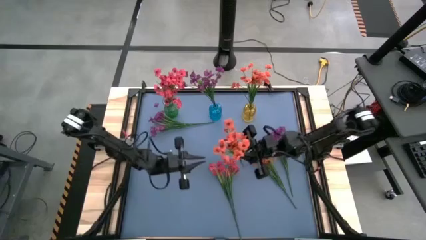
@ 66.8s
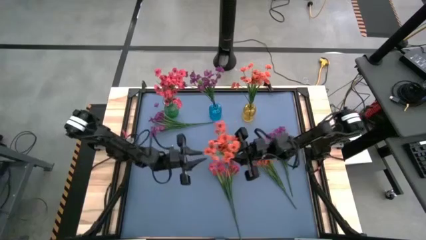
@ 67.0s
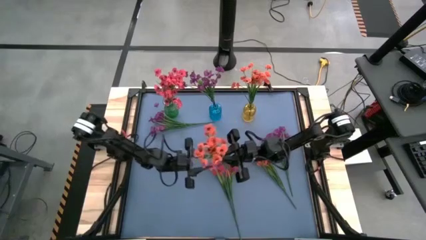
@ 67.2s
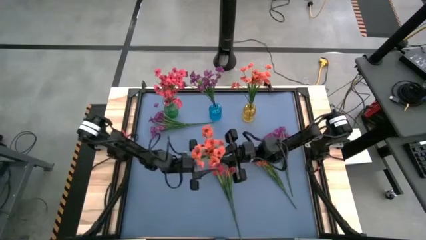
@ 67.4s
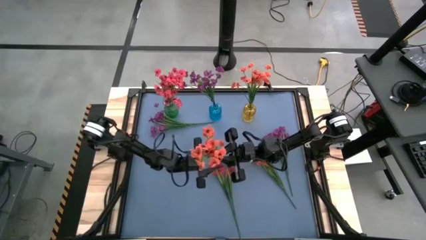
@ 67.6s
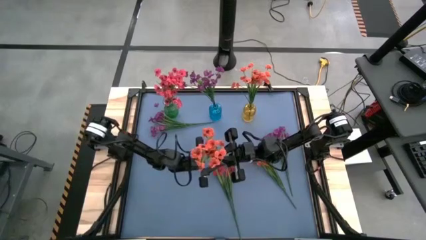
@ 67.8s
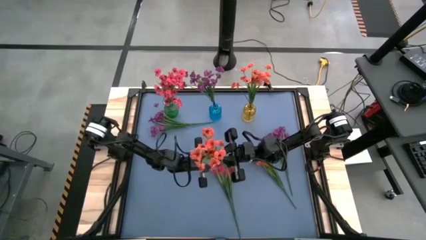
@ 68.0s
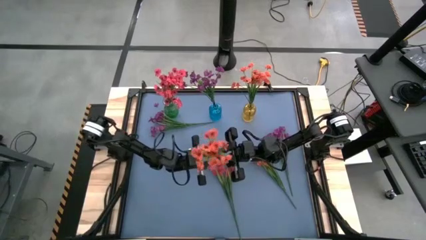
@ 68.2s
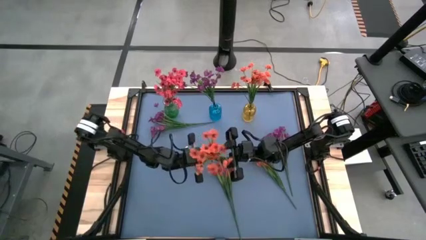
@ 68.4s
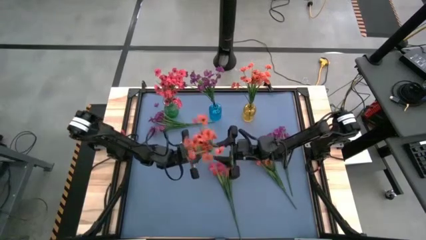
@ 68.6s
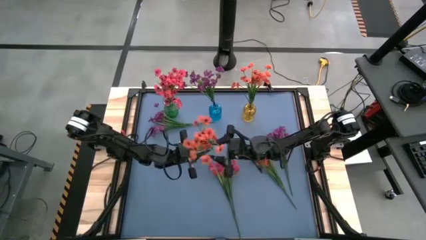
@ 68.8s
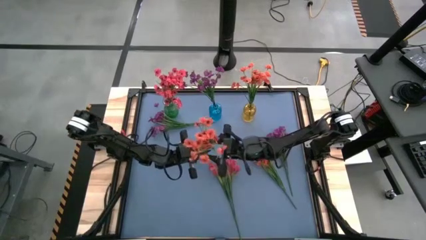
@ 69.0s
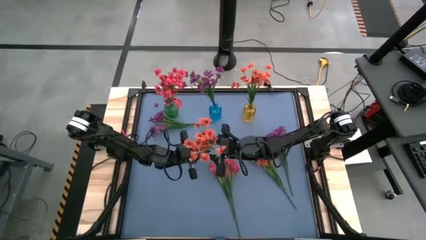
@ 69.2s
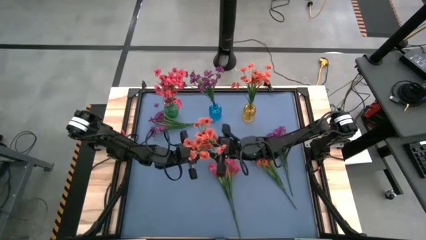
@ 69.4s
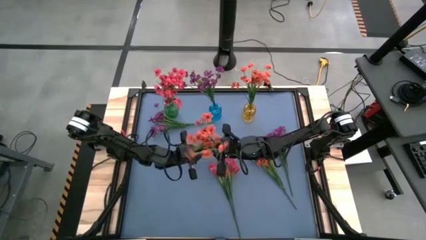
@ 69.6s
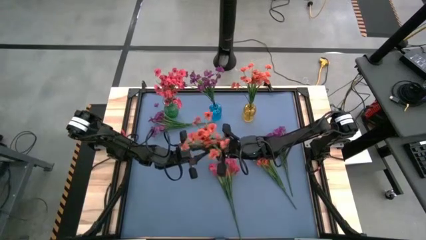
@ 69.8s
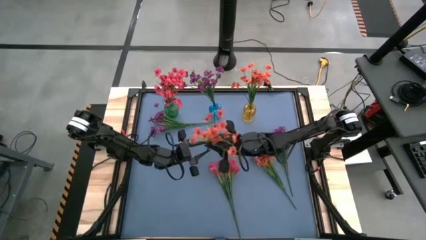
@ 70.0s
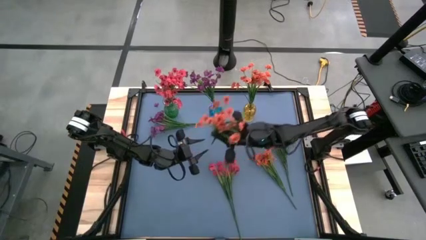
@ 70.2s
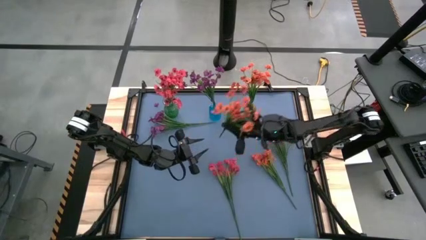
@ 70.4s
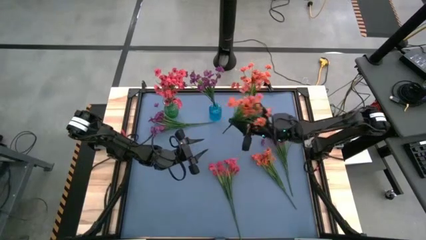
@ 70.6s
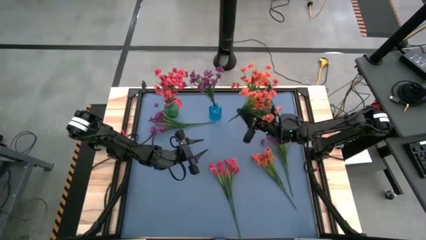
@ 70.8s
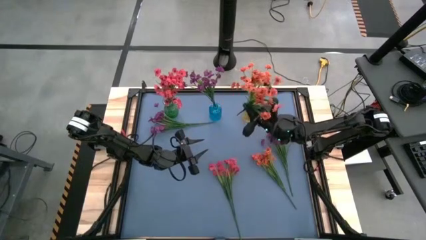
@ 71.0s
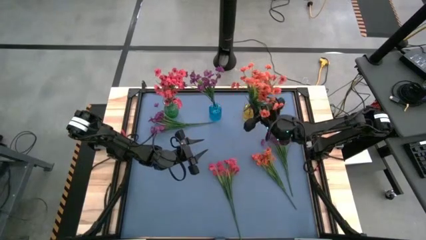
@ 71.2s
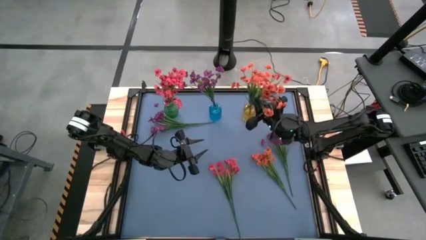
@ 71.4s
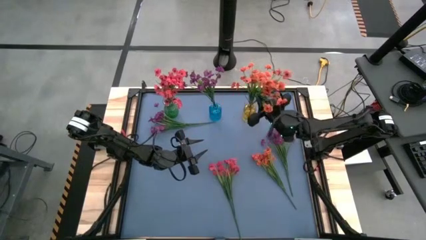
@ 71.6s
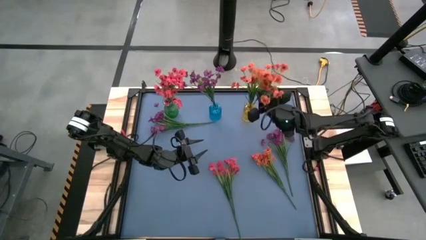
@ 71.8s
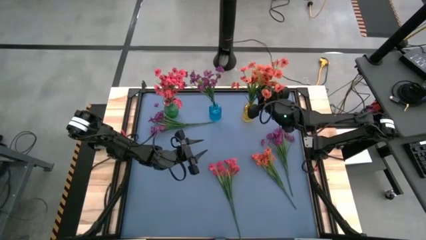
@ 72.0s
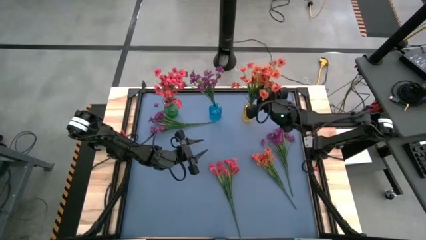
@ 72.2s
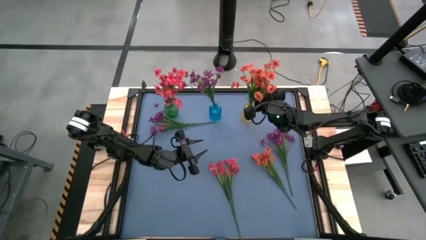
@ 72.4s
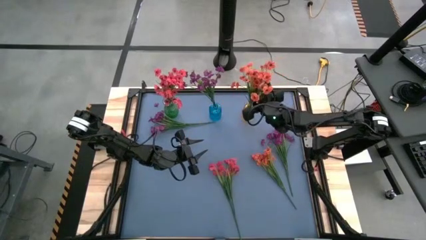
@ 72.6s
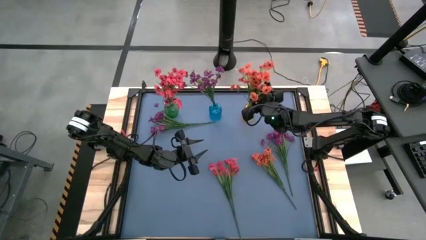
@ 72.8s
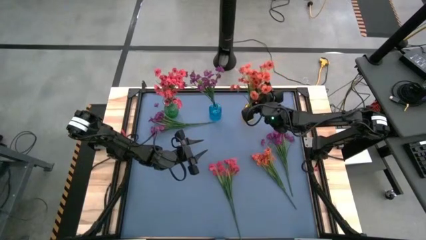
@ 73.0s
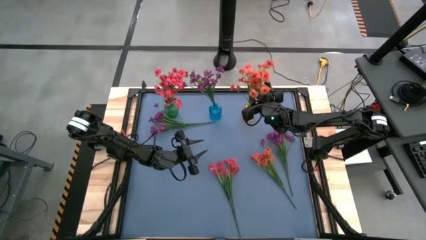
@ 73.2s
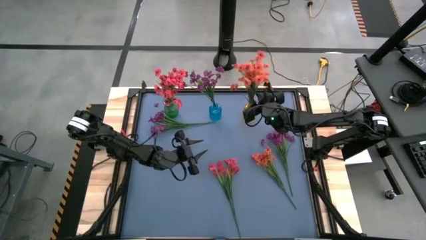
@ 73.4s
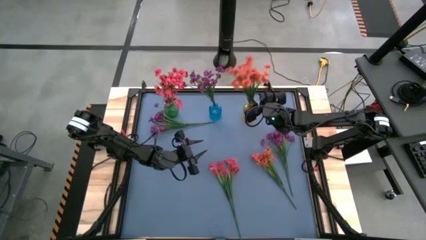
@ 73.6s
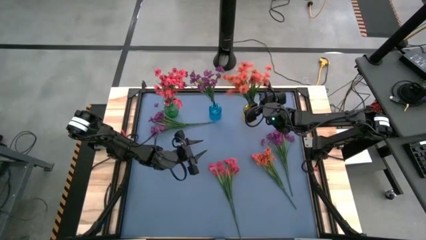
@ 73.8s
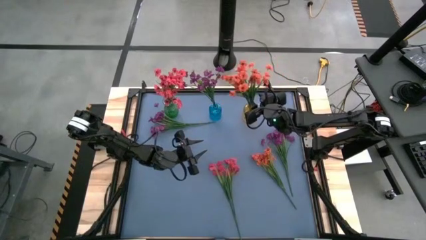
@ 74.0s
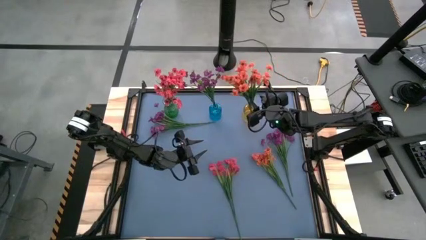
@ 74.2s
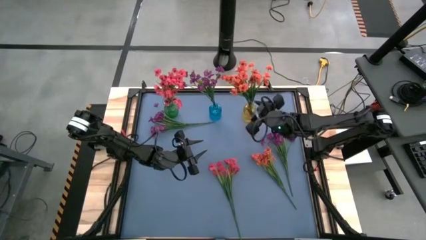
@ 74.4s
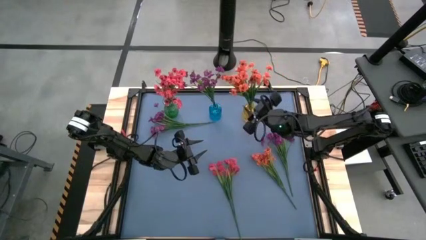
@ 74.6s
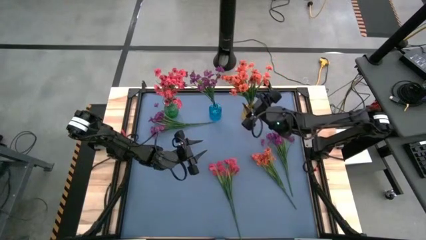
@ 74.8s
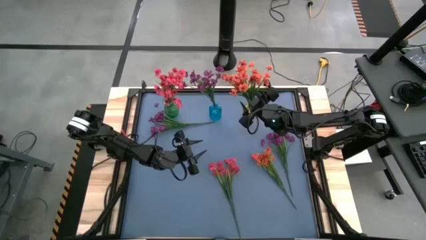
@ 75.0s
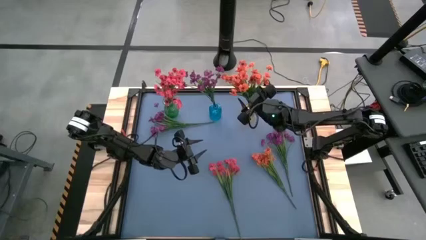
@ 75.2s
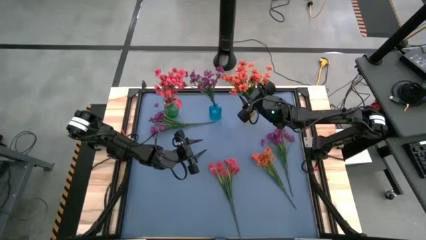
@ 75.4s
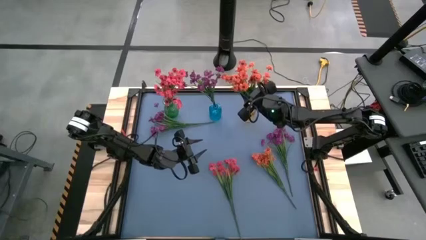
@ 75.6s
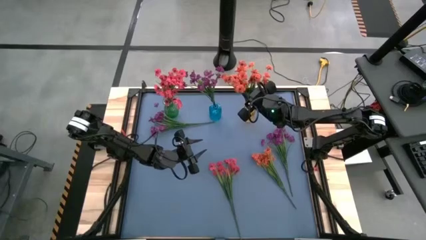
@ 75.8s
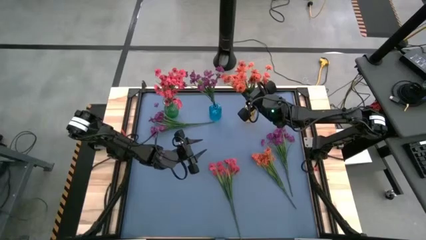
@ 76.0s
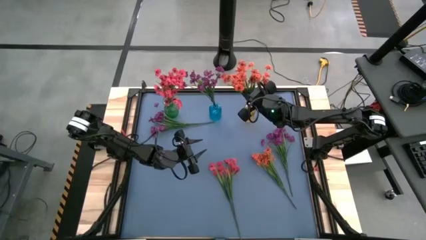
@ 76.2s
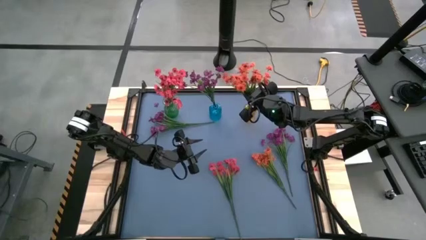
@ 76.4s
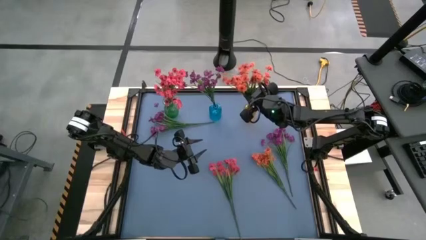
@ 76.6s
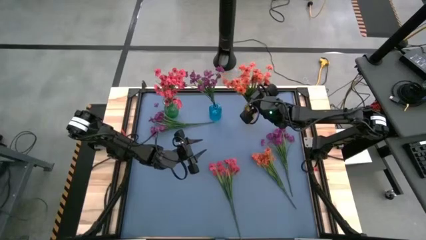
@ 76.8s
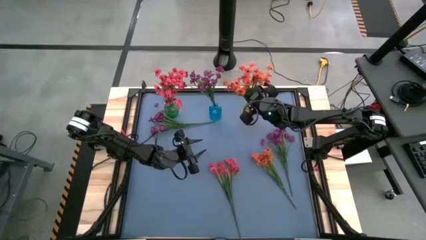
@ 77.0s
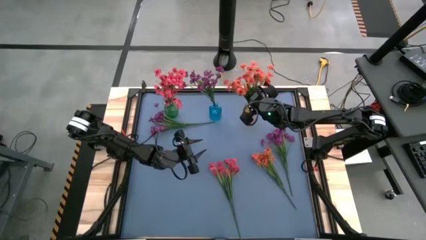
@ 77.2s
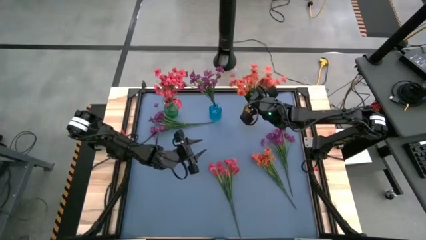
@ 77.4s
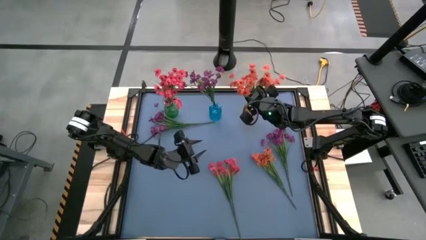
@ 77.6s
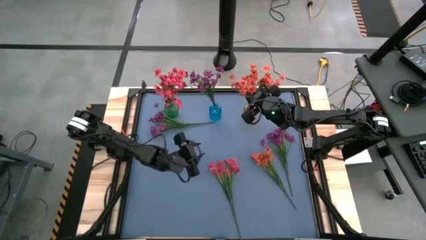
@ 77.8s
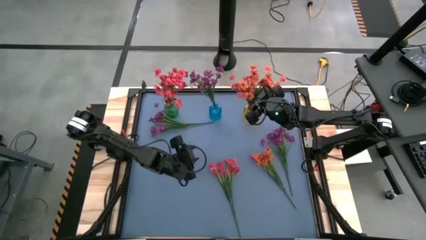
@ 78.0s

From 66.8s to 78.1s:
Task: Sort flowers into vase by color
Put the top orange flower into the yellow vase

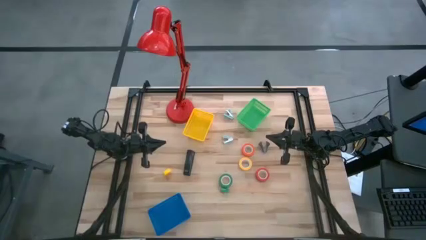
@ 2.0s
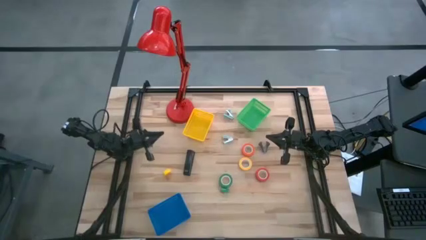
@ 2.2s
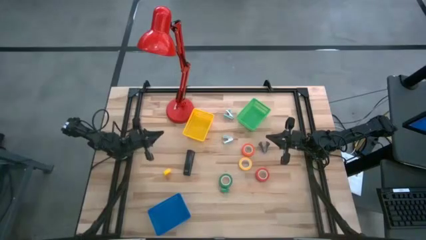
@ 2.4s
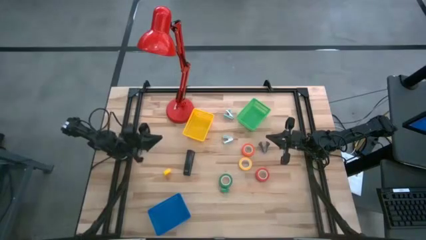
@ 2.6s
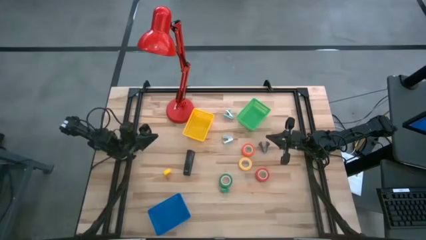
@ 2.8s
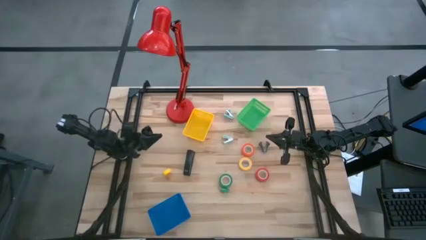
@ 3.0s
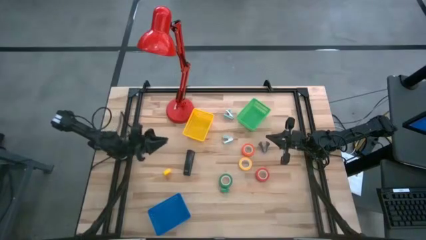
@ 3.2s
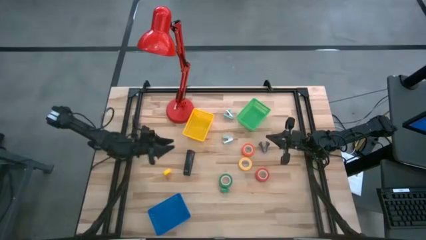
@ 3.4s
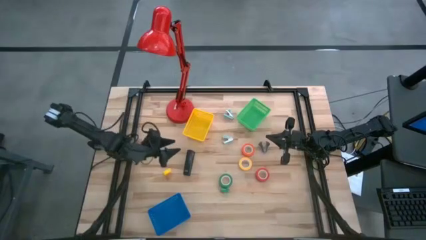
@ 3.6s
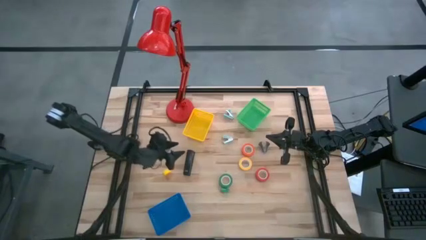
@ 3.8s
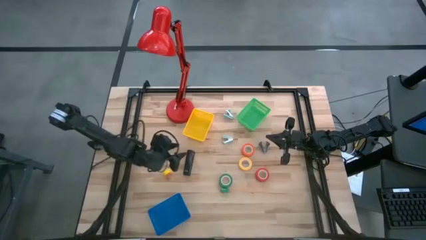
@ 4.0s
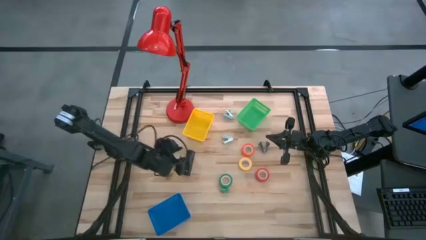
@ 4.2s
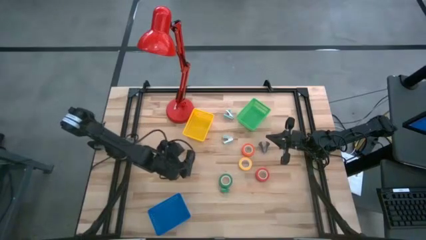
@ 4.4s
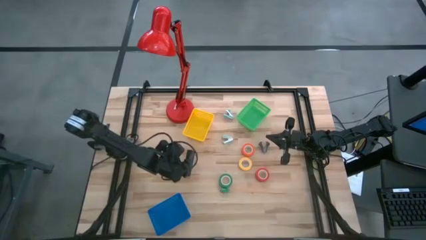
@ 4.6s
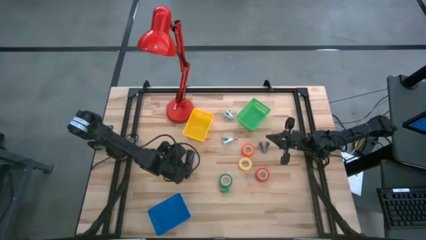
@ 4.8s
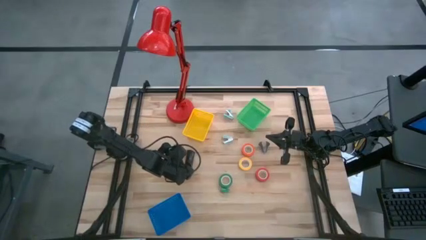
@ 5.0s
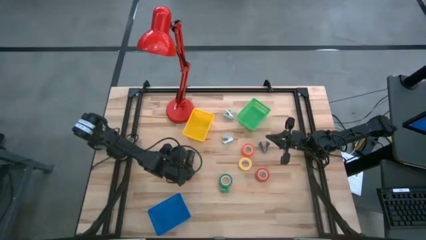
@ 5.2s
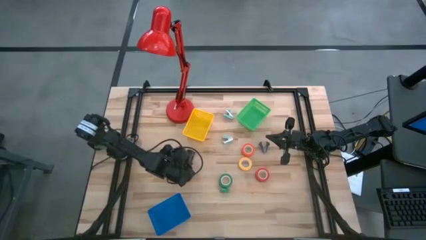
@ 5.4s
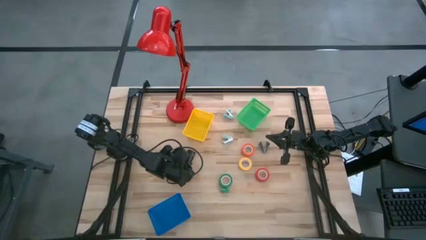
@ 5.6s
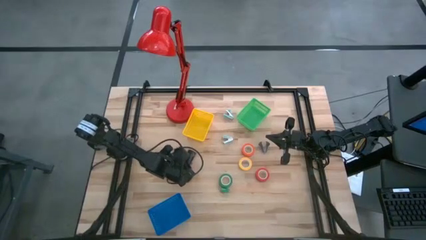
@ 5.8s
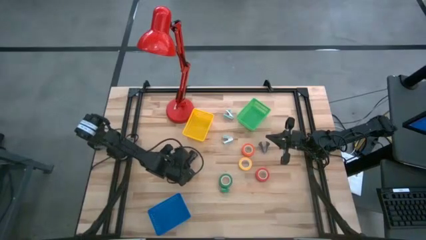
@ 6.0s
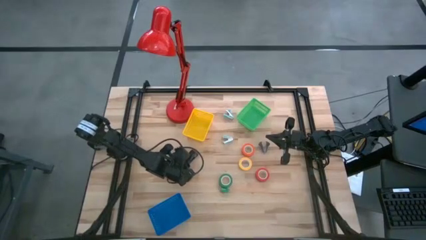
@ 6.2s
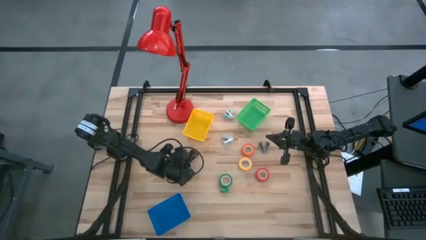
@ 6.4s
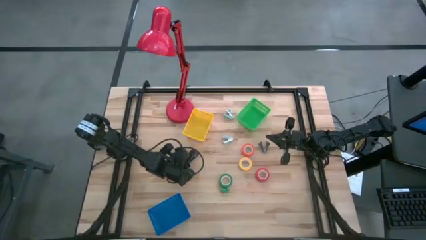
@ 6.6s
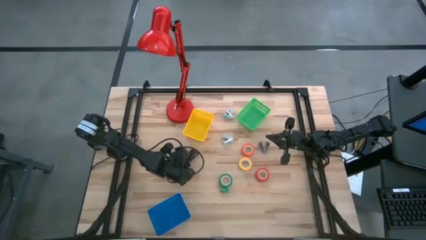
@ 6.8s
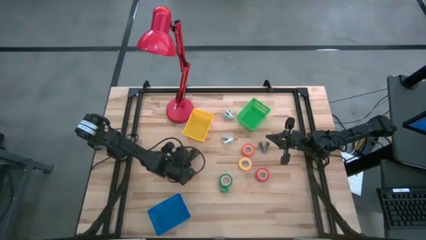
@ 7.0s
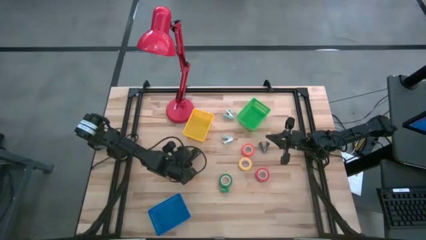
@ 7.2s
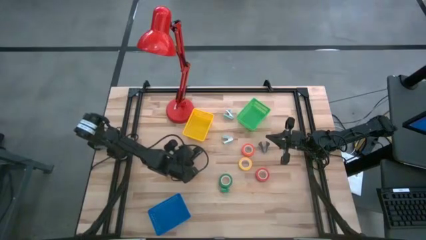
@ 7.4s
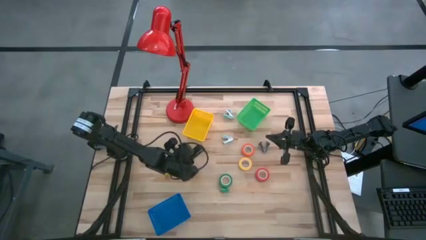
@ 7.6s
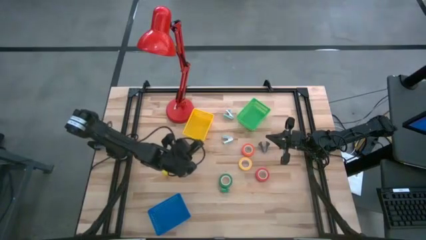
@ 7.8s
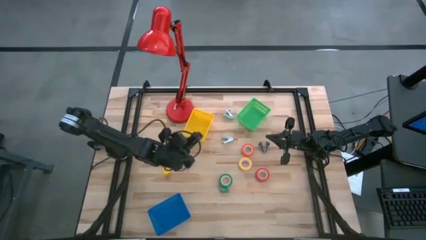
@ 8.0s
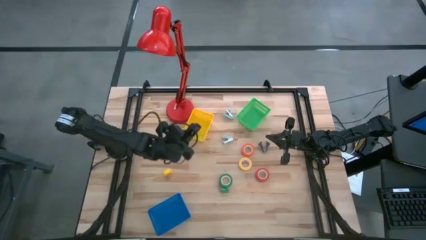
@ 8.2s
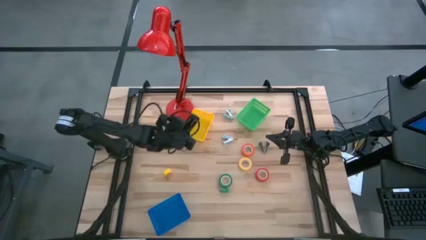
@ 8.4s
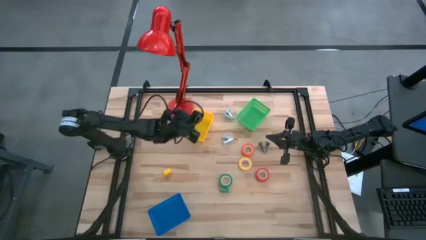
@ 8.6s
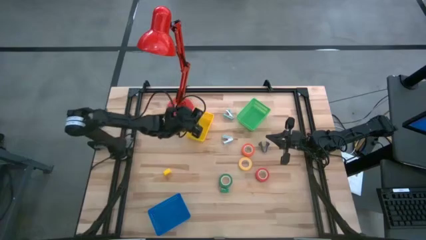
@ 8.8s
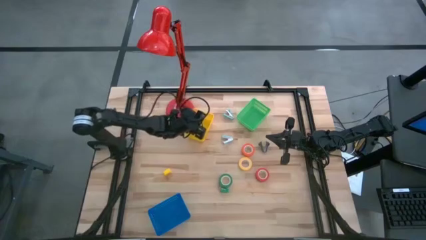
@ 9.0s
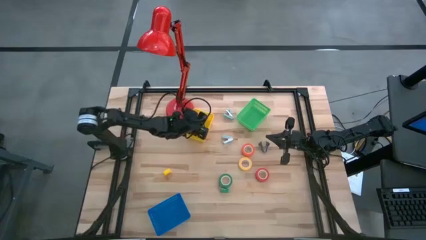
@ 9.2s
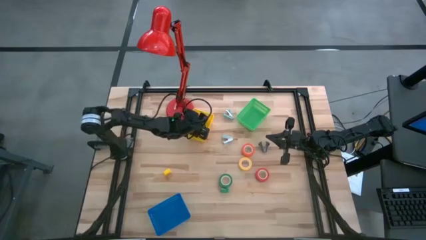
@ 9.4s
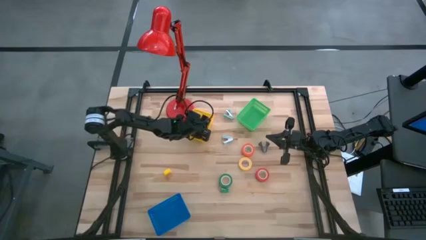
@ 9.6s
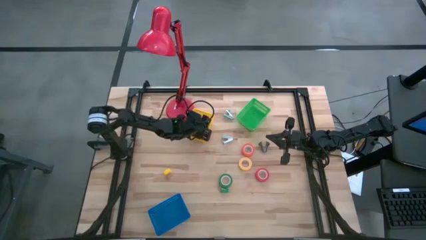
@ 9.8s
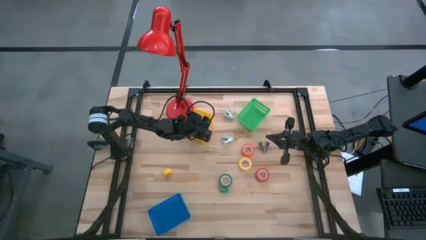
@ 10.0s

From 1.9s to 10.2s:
Task: Pick and place Stapler, Stapler remover, tape
Put the black stapler into the yellow bin
